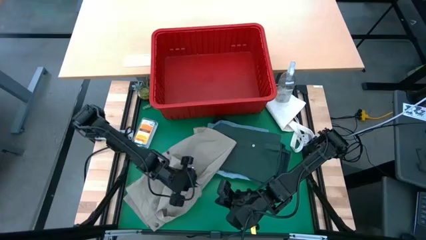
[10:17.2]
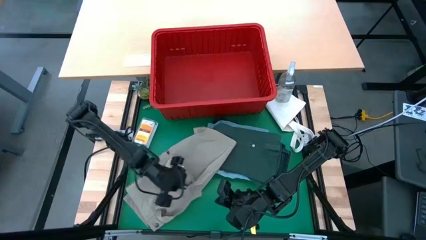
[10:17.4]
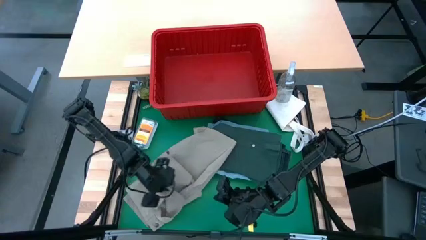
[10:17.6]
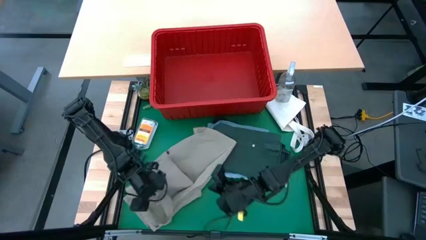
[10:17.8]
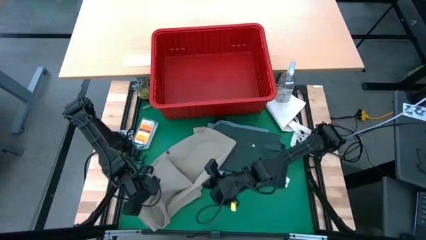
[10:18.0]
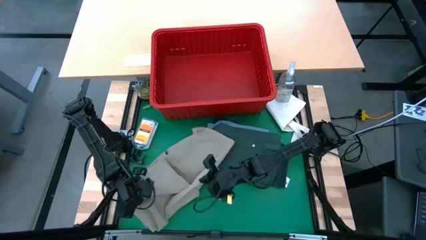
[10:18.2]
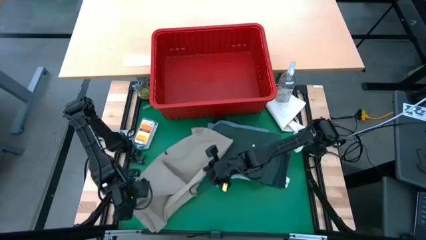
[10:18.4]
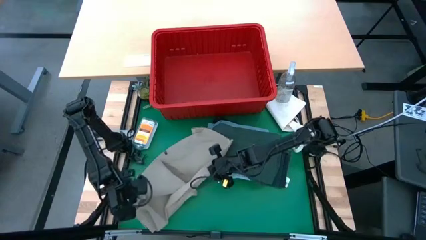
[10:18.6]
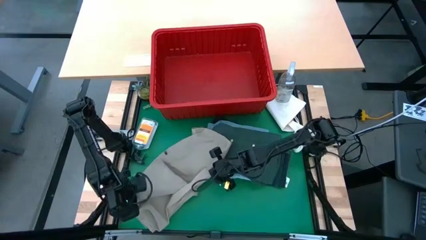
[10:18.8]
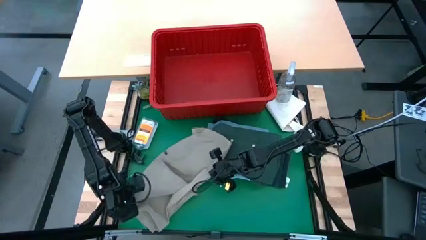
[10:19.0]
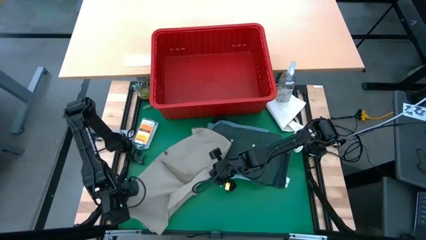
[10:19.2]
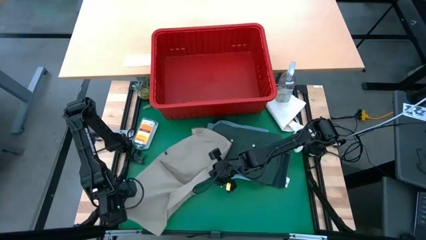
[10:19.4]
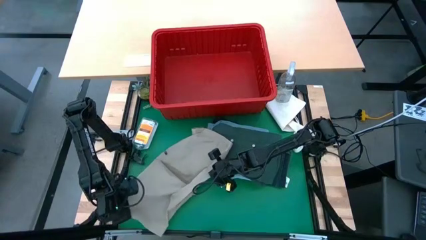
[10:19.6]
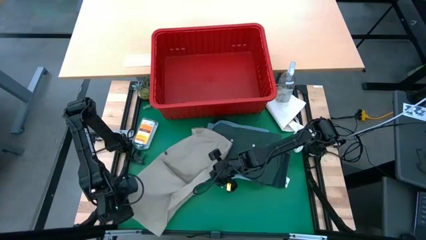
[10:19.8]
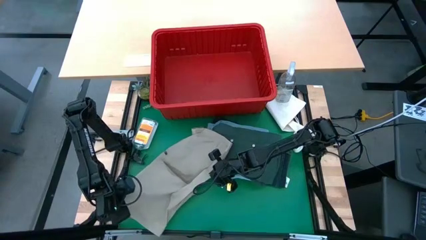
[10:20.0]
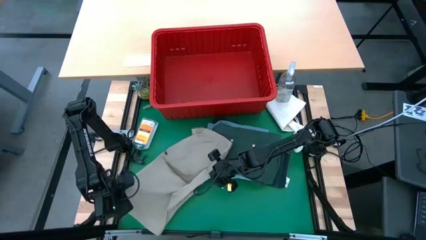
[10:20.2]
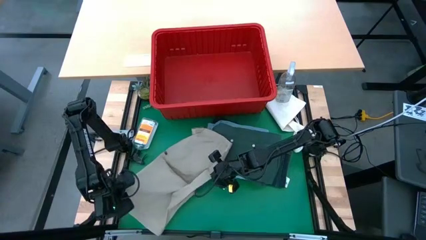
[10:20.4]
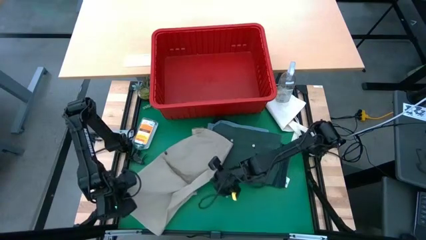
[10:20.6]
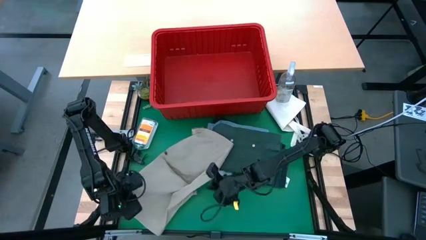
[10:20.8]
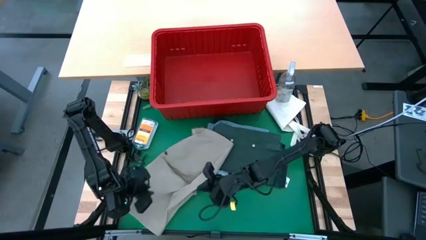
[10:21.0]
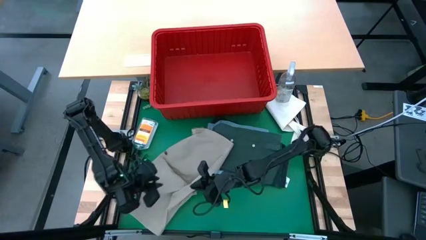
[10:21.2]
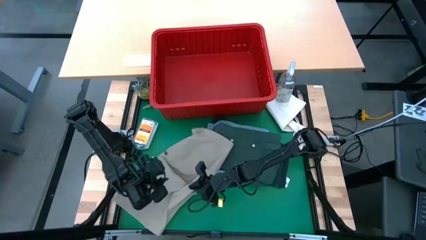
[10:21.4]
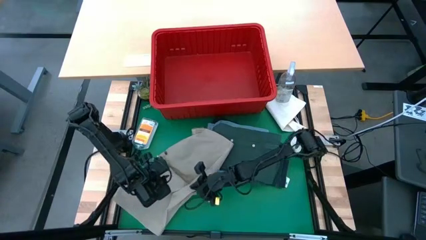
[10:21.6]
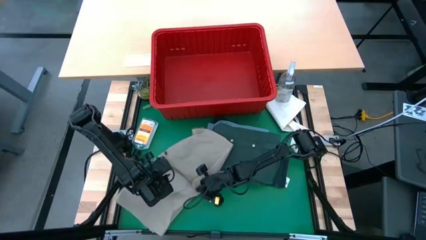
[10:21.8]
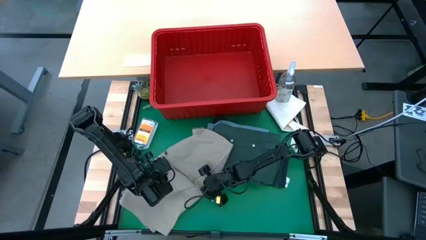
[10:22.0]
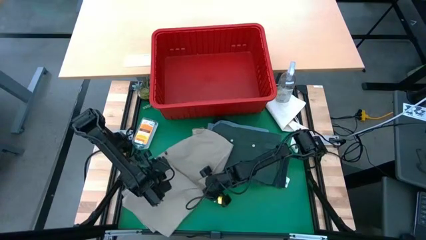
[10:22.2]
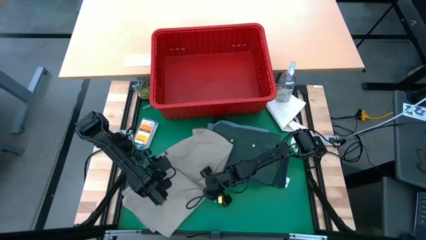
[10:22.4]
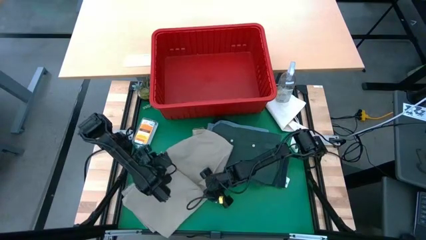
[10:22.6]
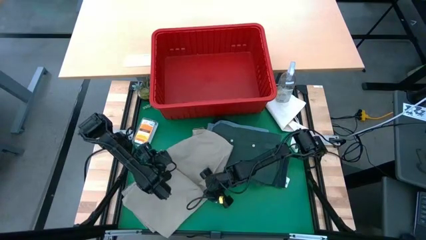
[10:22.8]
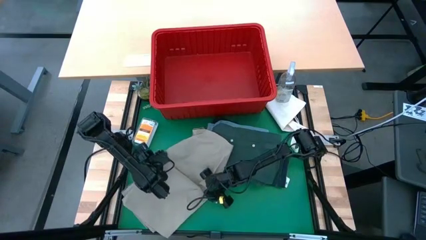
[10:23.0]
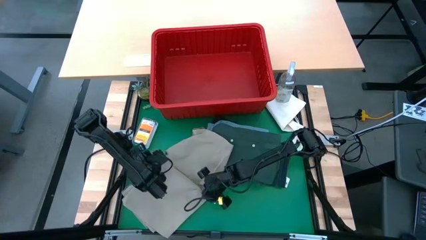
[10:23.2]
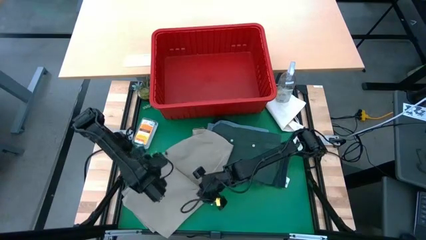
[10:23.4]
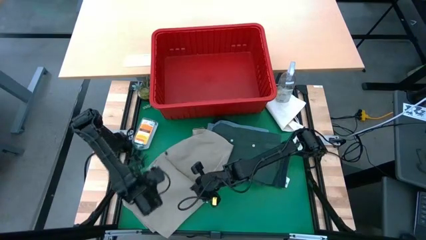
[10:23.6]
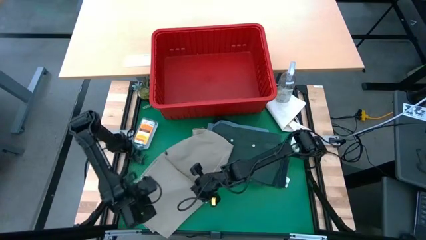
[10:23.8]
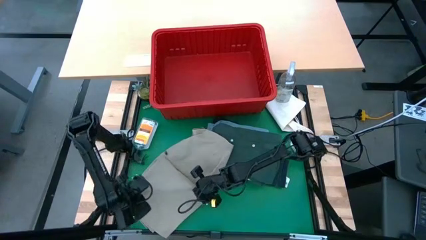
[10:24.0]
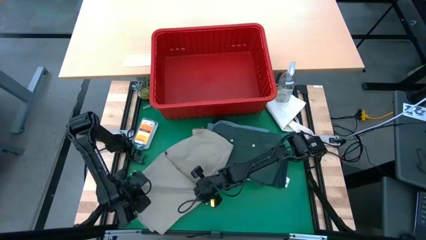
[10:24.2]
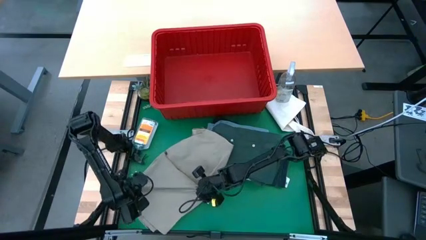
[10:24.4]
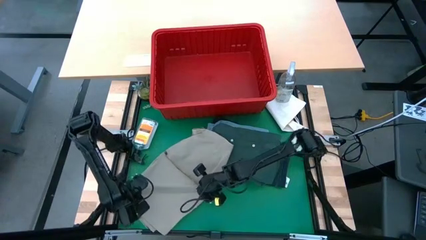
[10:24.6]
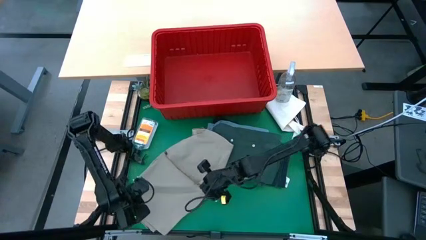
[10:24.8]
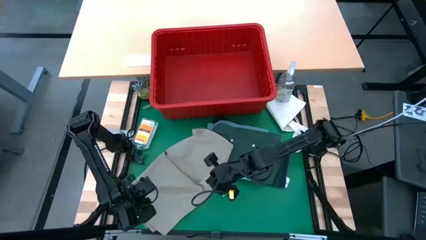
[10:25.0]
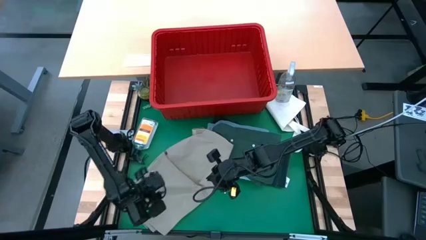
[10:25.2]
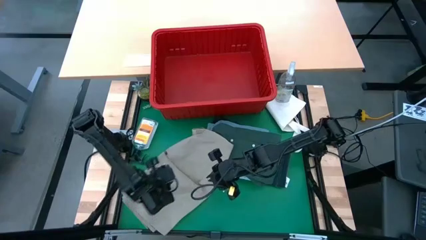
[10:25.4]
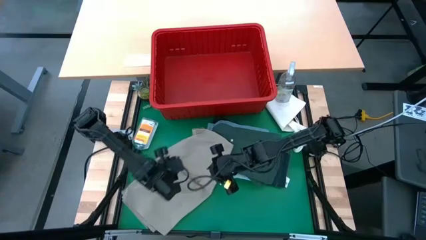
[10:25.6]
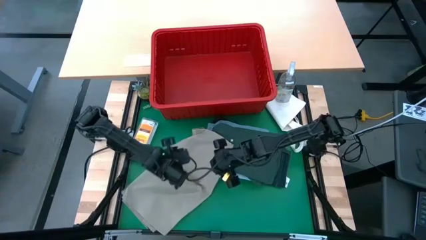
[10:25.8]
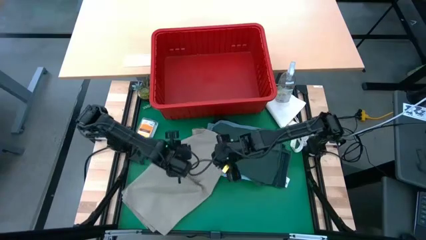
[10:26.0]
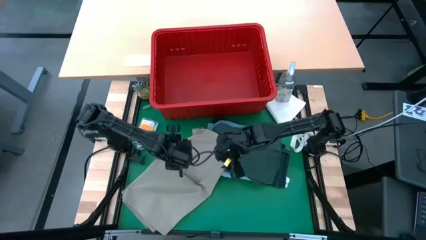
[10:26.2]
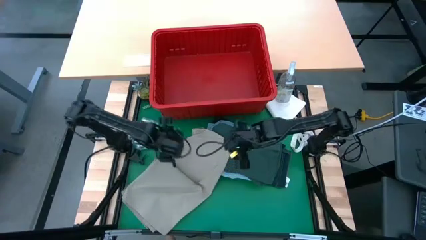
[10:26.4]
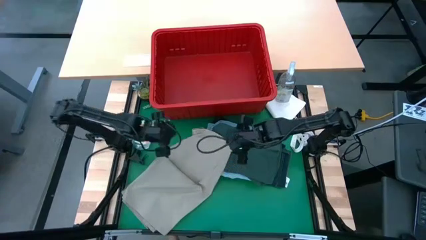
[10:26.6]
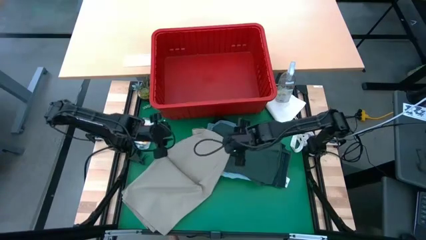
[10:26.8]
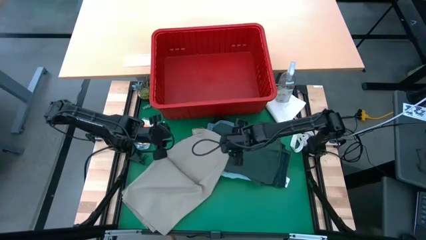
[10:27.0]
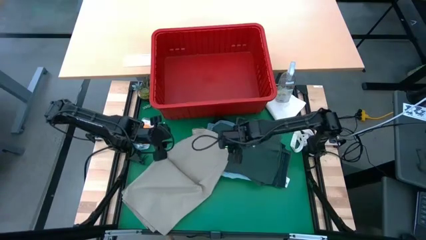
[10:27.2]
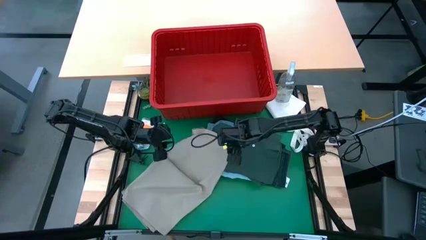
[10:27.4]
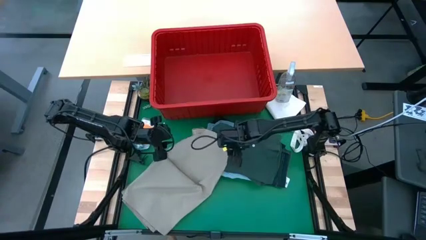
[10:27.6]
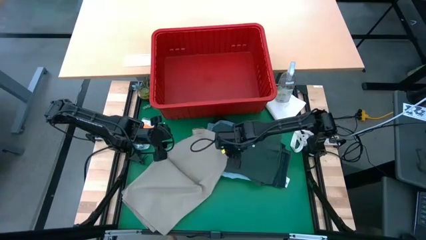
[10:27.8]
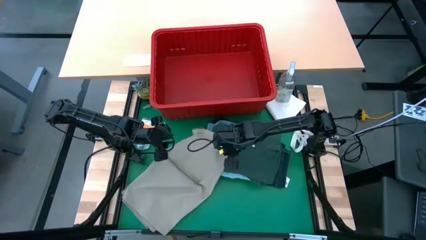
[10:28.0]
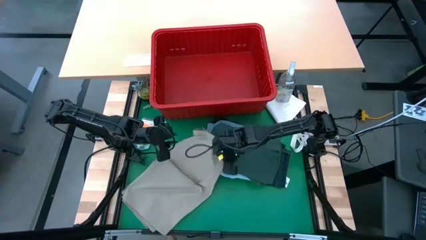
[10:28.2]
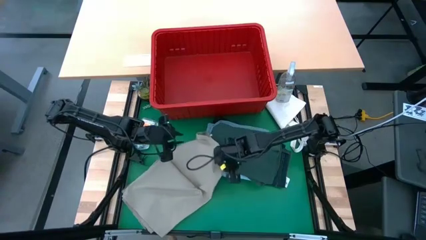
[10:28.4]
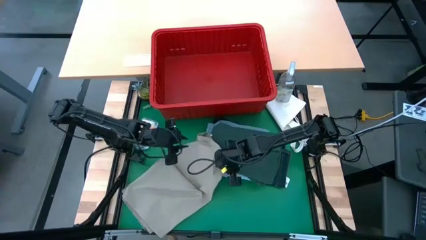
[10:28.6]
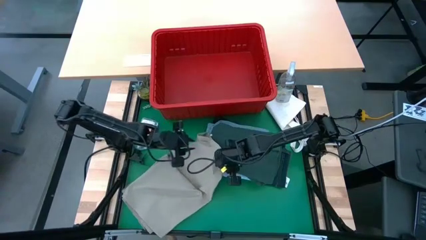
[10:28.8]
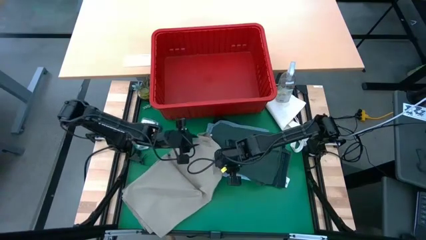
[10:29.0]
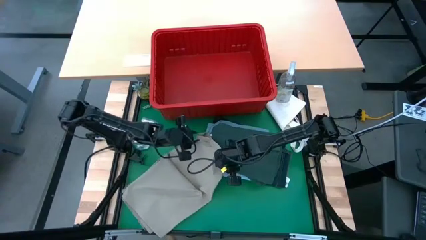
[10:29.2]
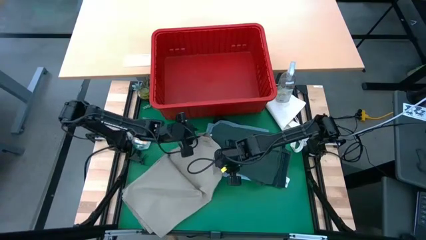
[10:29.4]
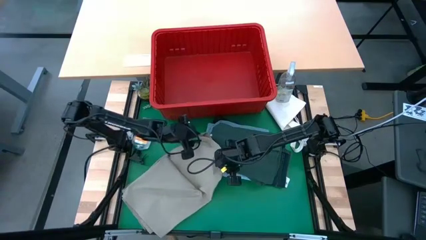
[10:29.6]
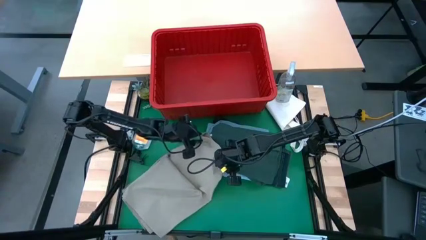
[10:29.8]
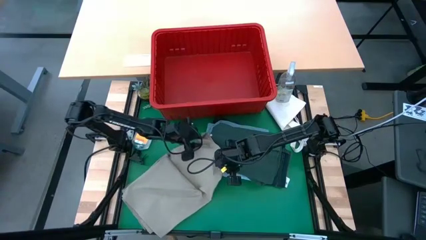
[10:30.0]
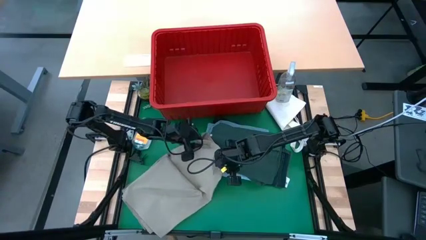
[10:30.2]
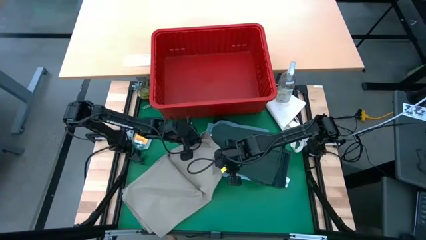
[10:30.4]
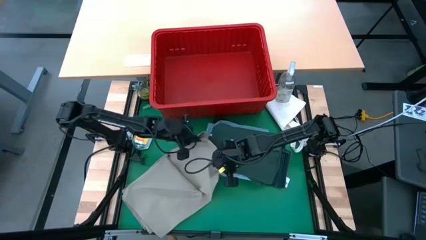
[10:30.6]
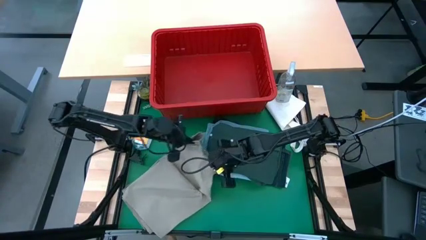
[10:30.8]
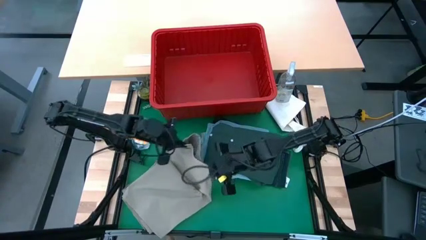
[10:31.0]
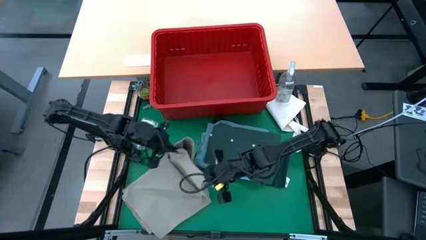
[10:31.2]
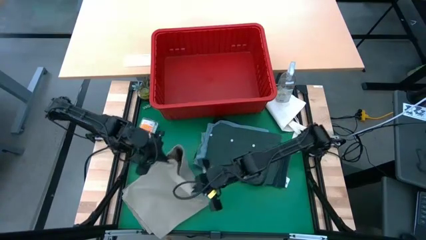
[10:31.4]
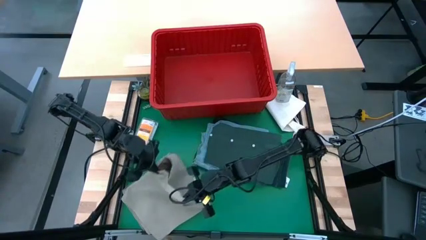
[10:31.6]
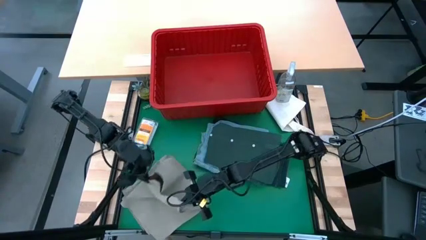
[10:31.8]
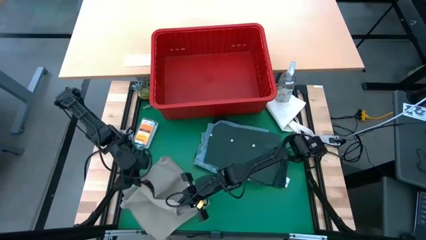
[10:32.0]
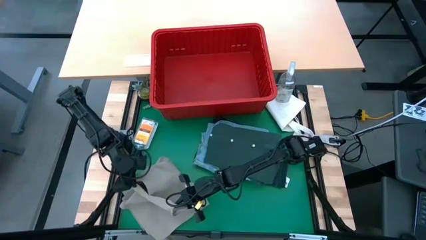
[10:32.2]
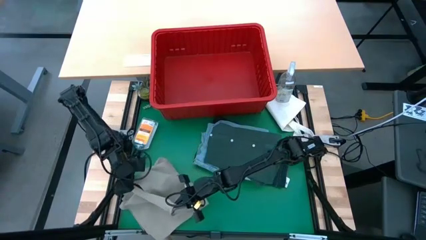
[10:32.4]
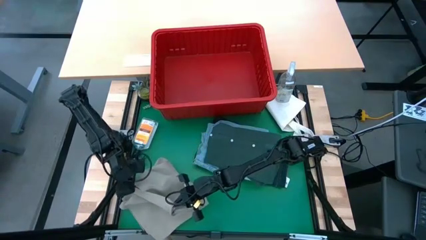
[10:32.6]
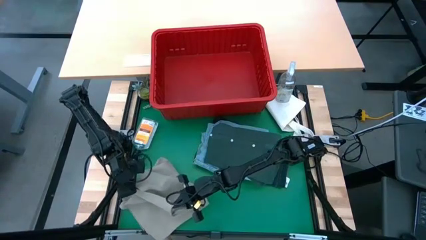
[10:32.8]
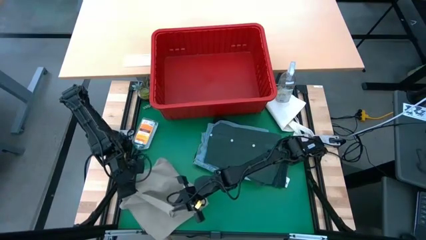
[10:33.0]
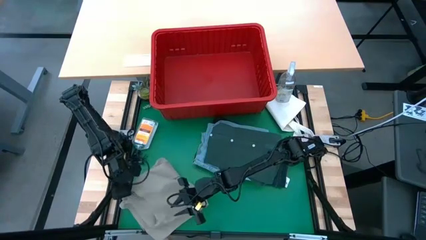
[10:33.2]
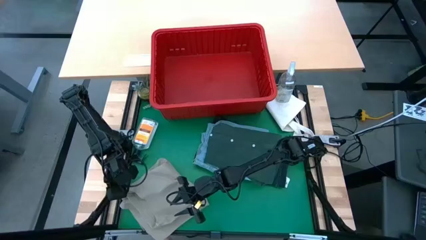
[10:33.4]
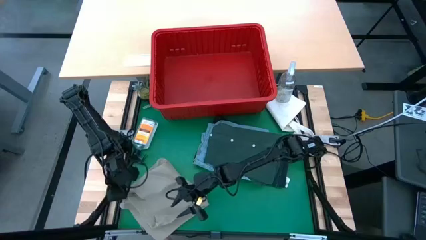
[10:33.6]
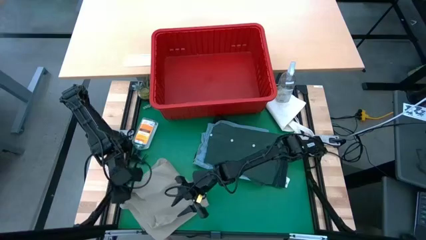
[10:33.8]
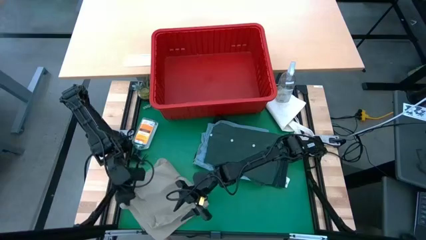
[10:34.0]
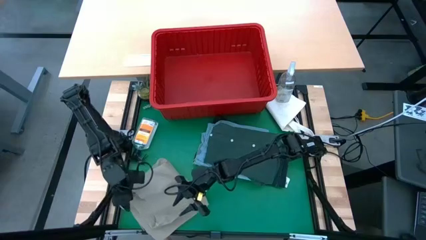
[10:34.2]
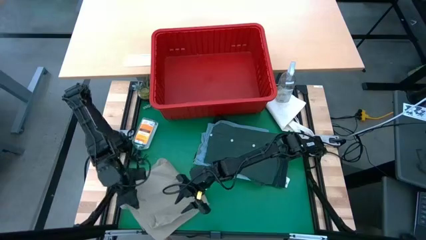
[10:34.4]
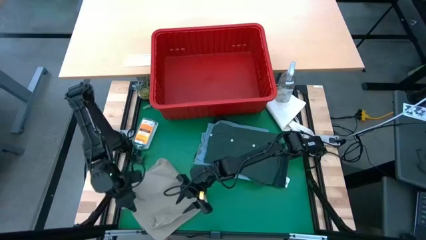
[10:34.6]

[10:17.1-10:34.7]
Task: Fold laundry
Fold the beige shorts
